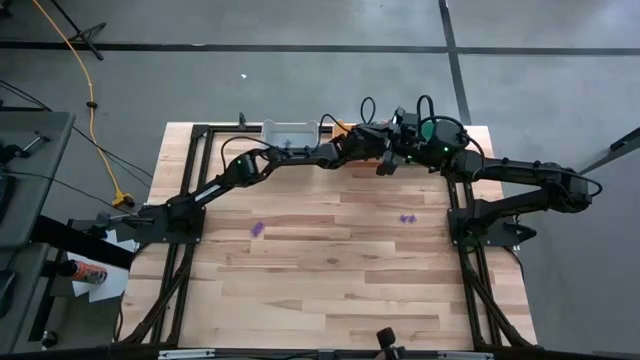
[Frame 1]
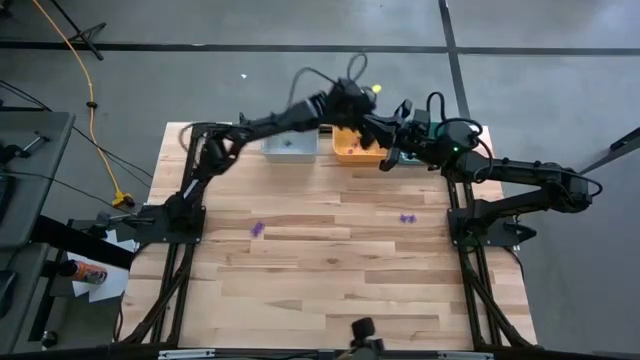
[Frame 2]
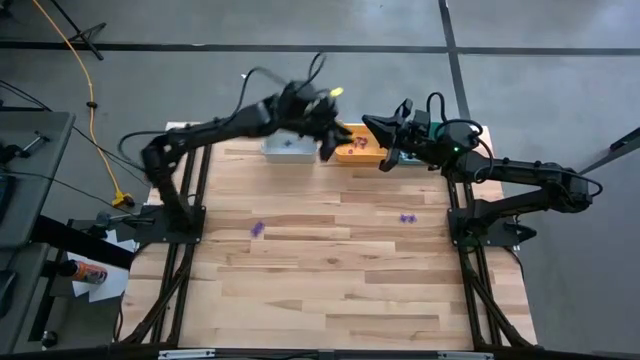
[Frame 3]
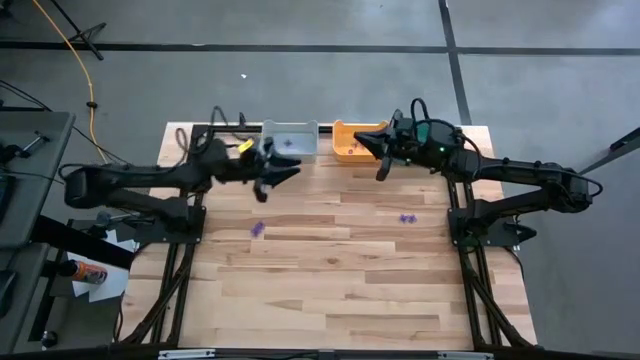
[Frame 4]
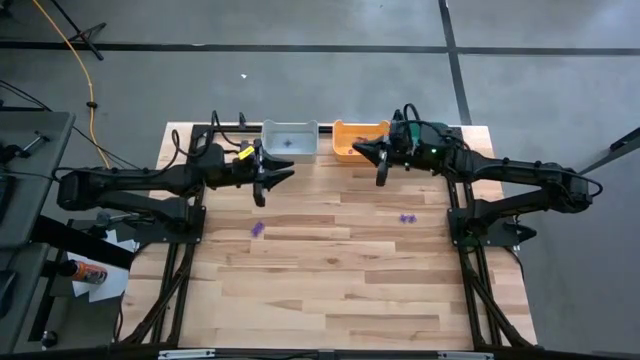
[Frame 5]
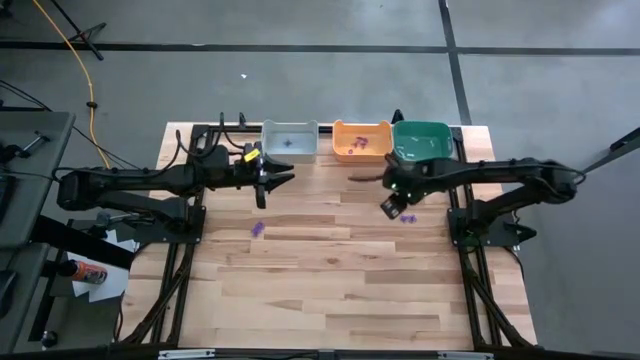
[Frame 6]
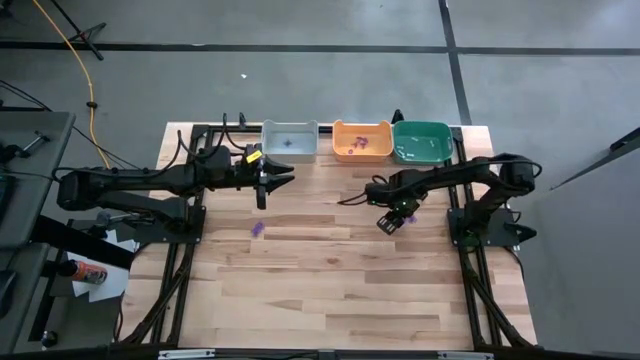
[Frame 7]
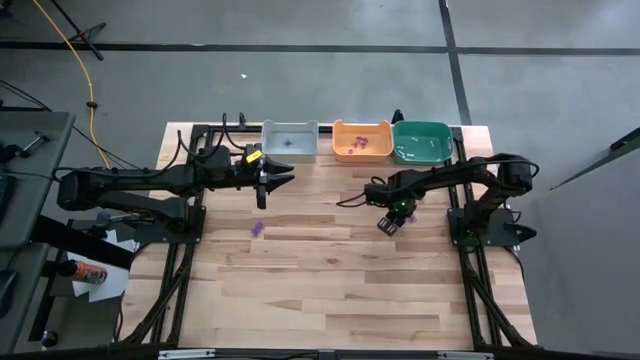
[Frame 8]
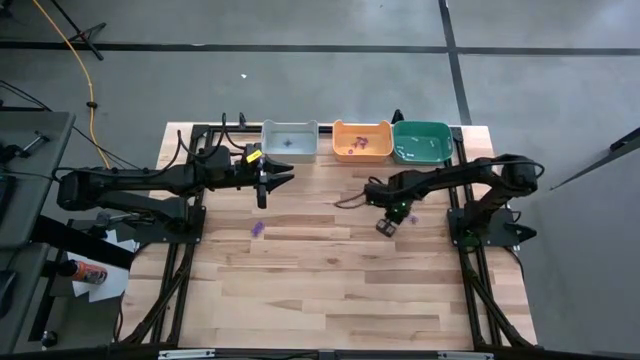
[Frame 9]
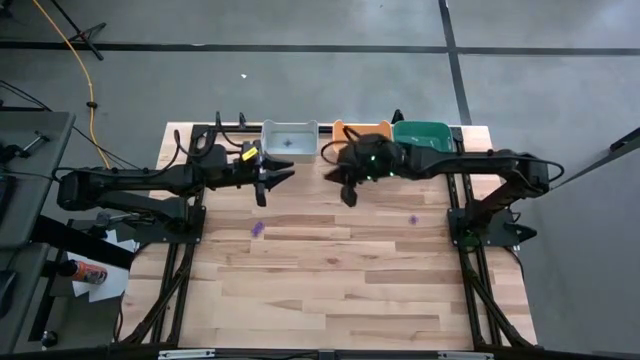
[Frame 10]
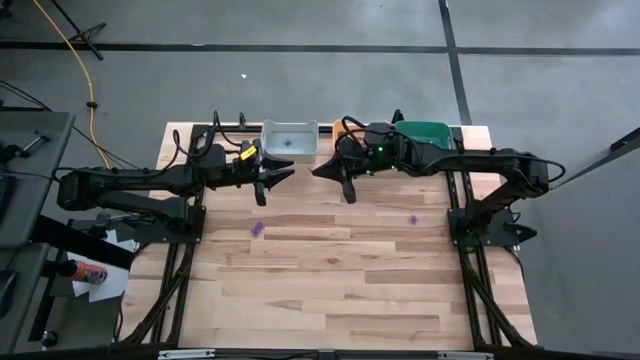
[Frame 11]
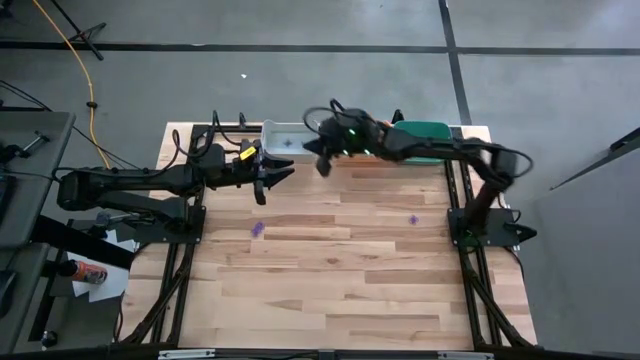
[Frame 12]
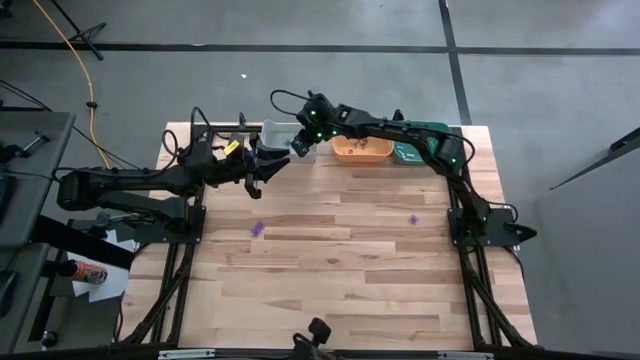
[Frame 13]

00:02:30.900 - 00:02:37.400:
Task: Sort Halloween decoration
Put the purple spider toy into the gray bin

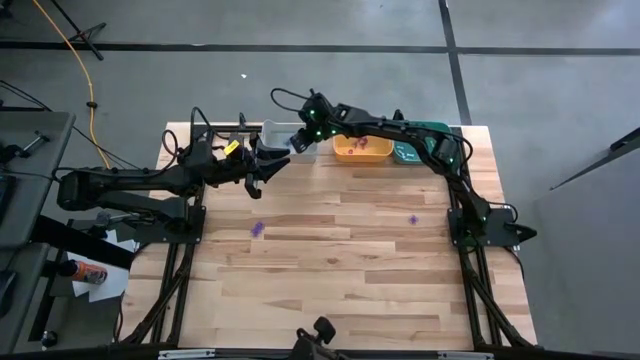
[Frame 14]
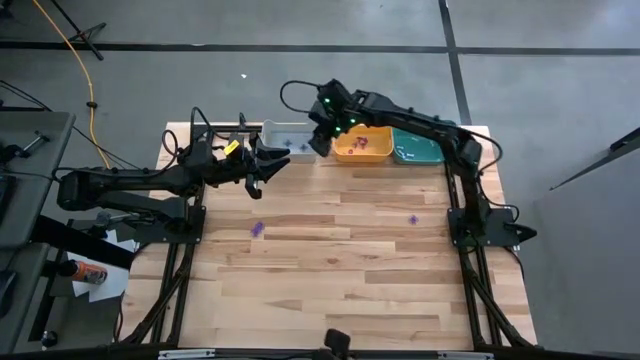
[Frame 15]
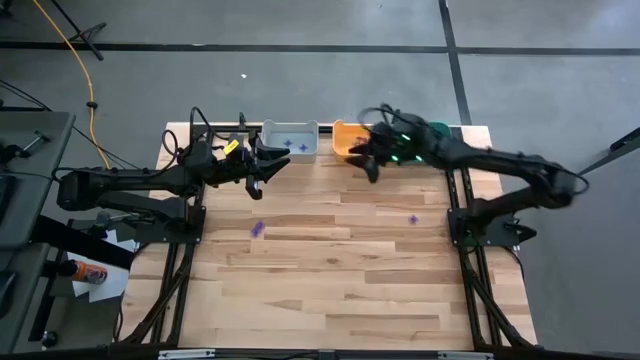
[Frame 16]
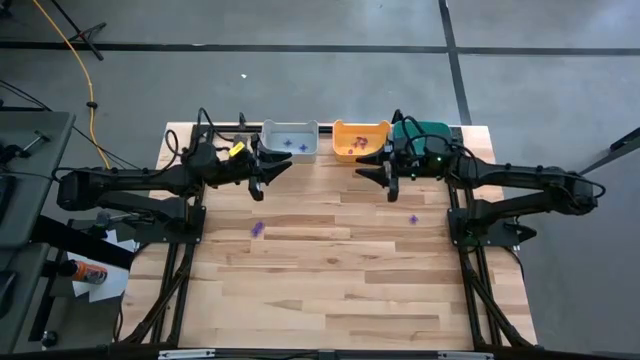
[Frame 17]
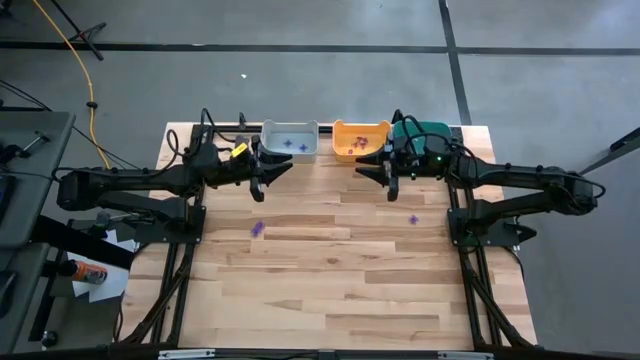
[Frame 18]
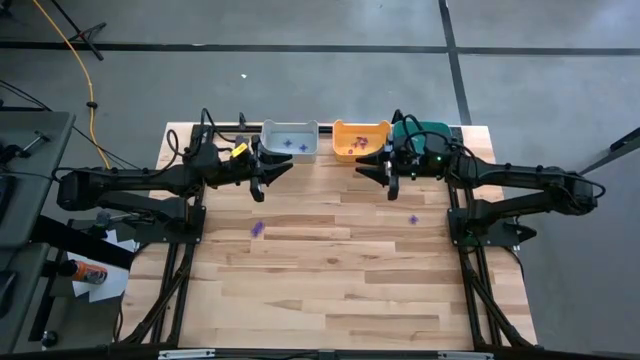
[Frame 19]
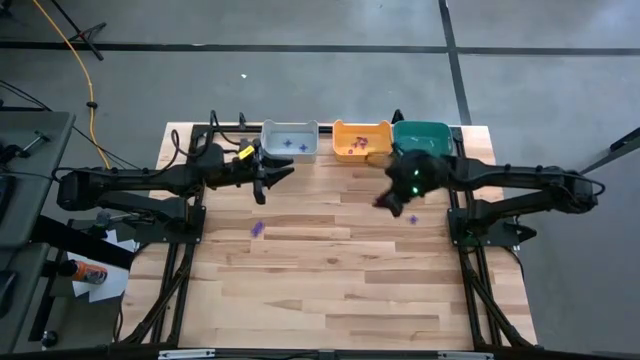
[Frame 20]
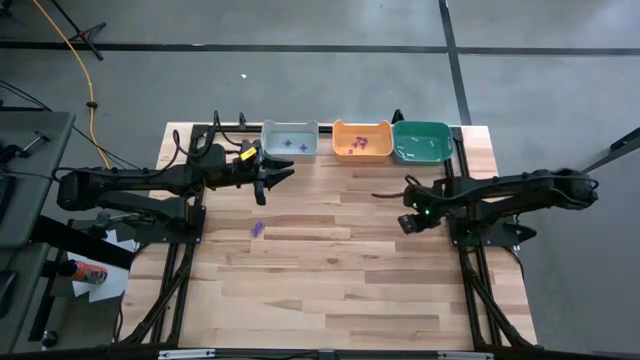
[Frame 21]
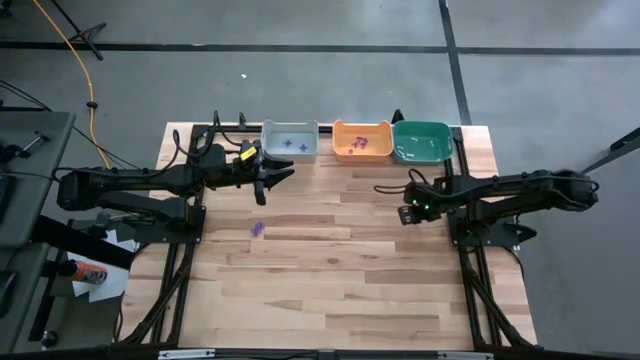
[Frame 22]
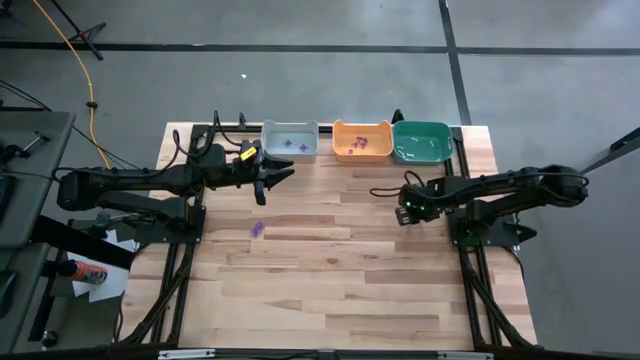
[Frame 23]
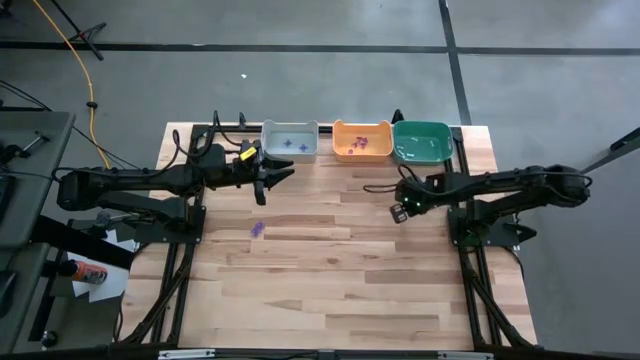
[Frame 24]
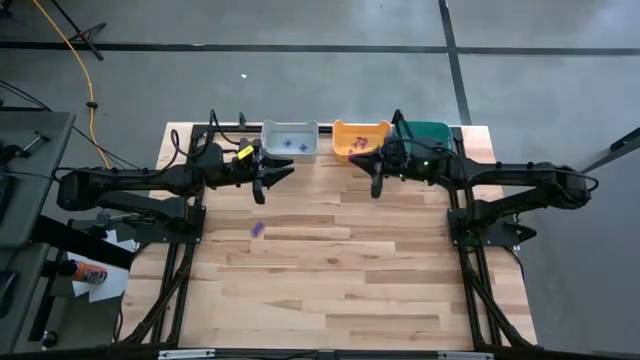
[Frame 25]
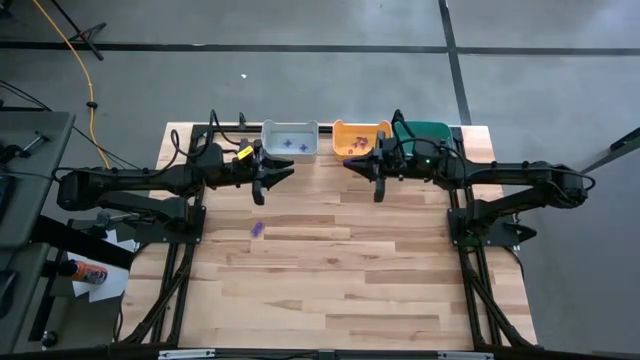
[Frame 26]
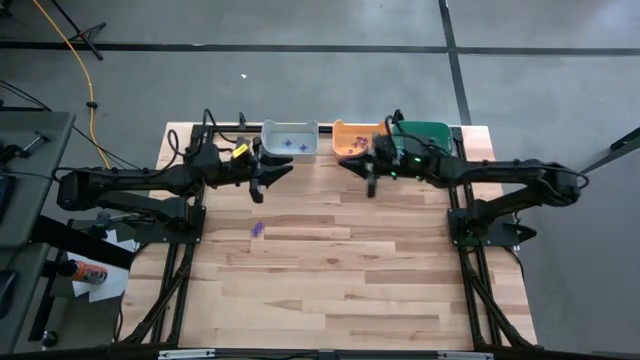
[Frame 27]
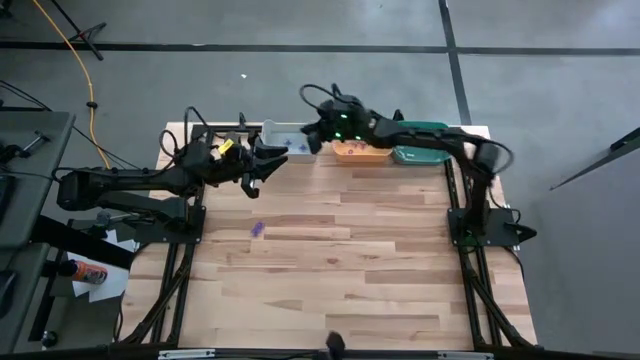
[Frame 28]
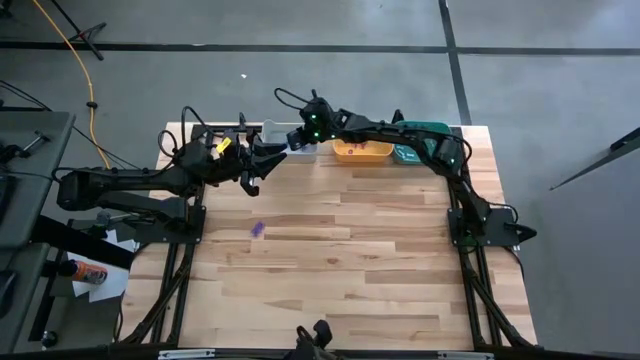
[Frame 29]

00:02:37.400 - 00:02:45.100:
Put the purple spider toy into the gray bin

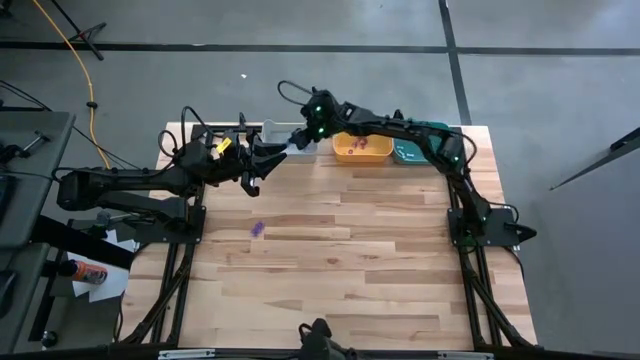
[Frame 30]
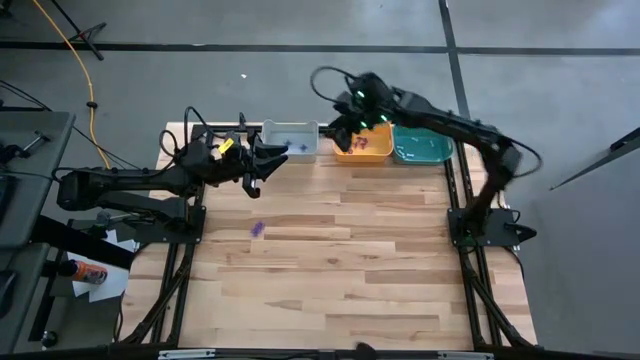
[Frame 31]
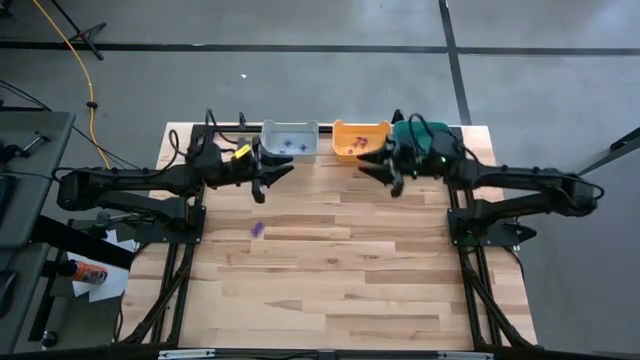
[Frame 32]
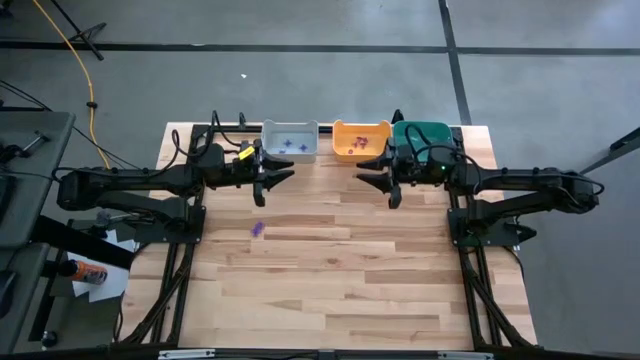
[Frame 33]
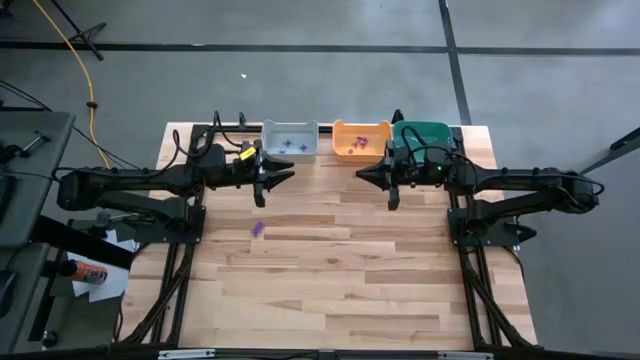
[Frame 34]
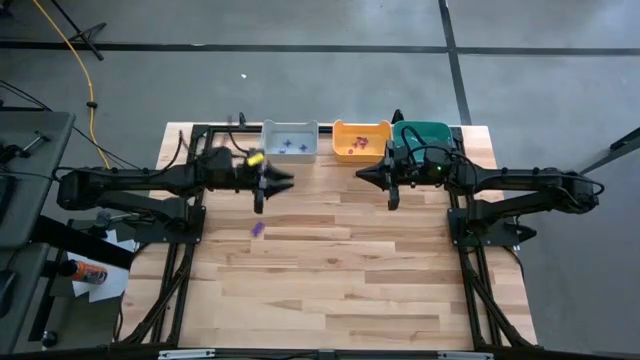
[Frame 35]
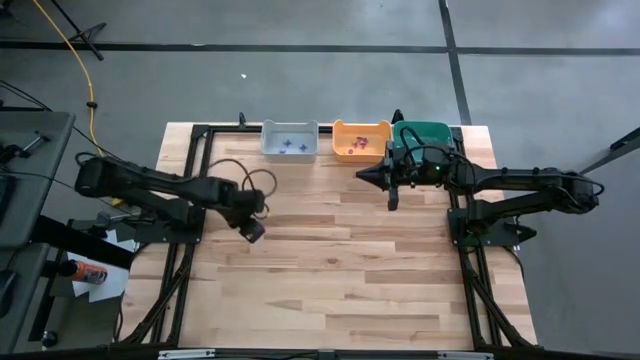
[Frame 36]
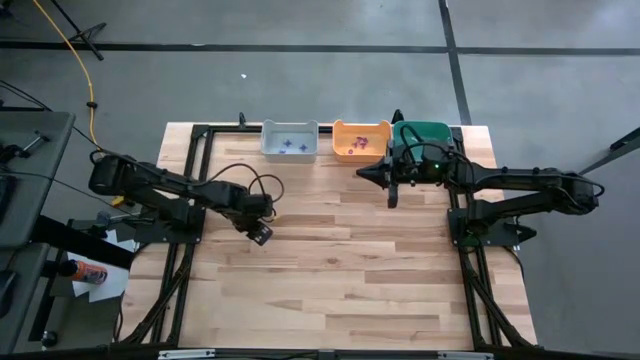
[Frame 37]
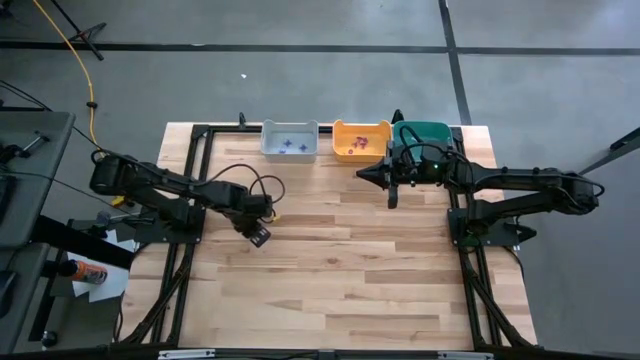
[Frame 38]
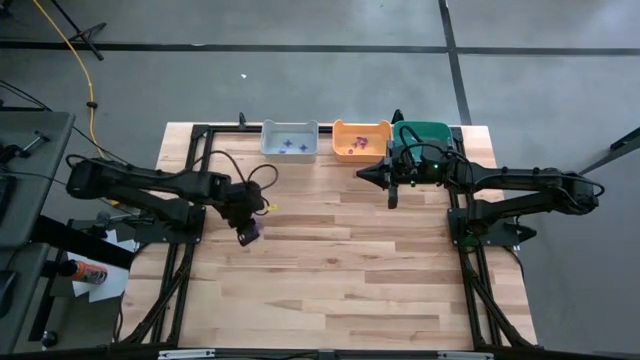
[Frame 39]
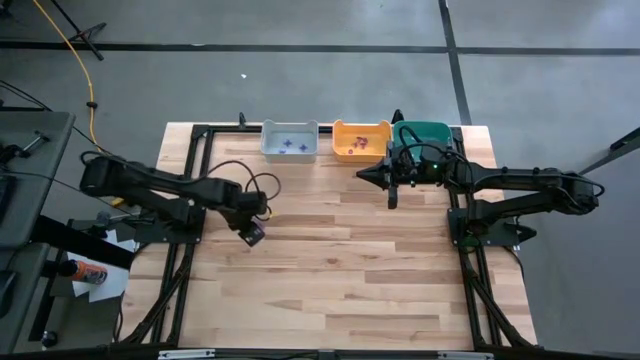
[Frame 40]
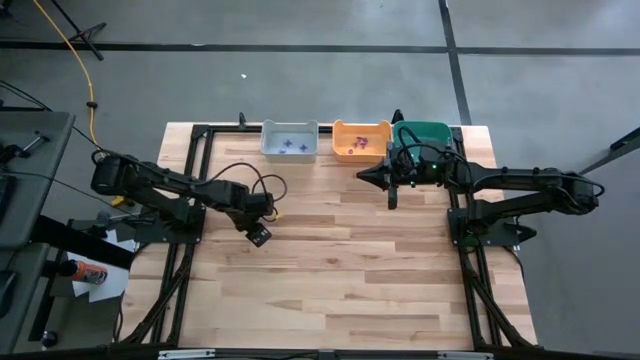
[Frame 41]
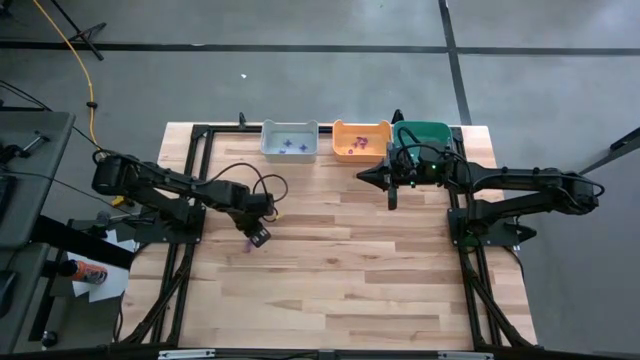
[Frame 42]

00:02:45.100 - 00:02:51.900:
Put the purple spider toy into the gray bin
